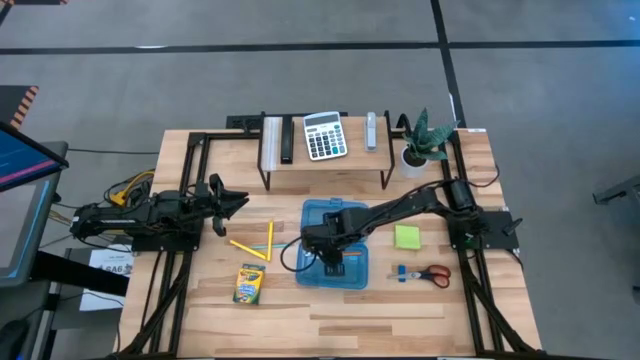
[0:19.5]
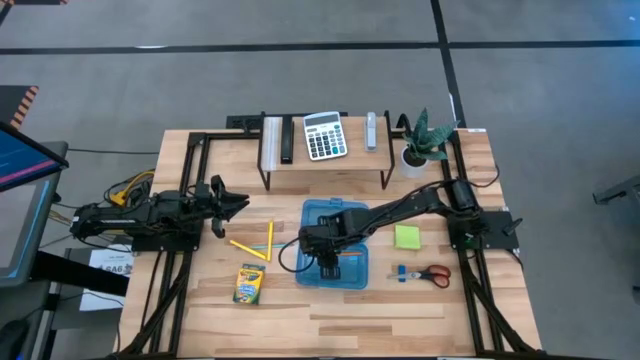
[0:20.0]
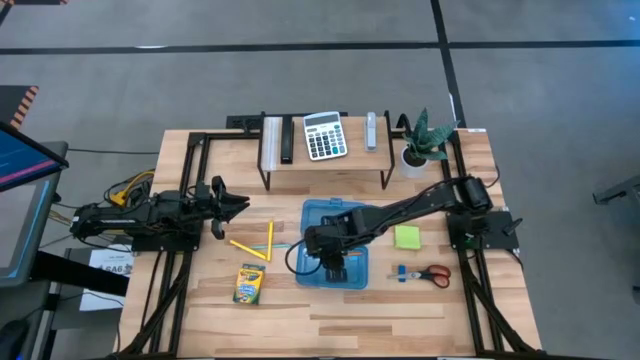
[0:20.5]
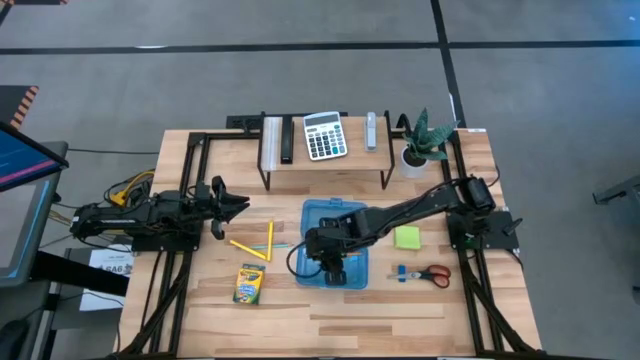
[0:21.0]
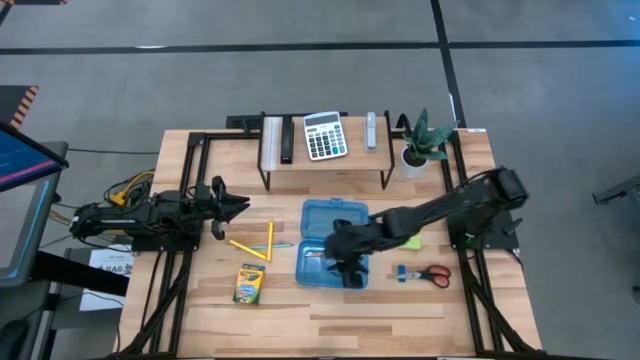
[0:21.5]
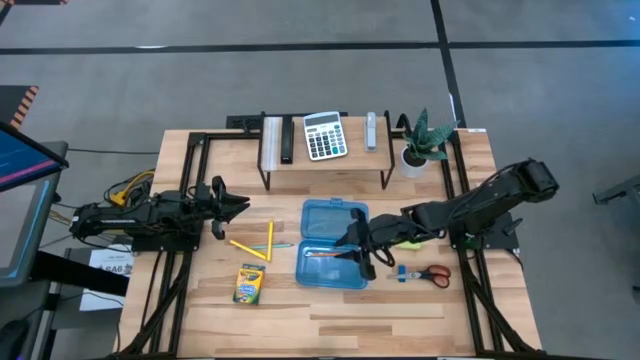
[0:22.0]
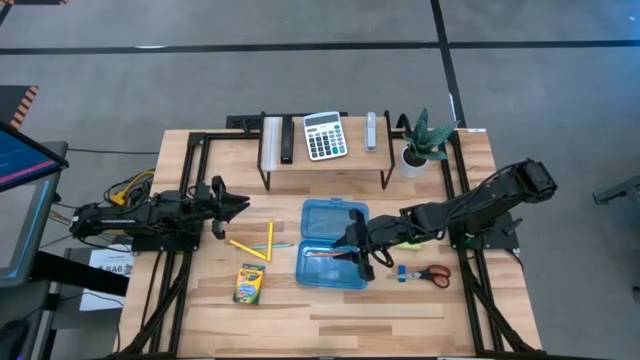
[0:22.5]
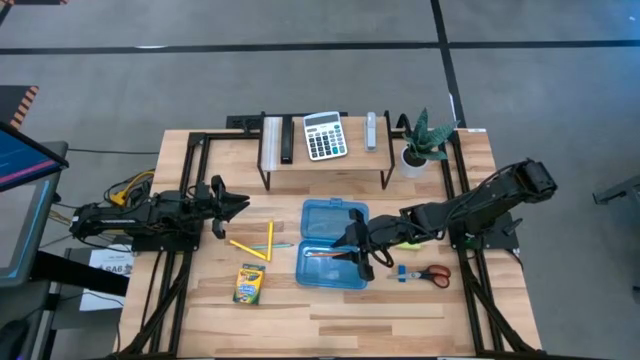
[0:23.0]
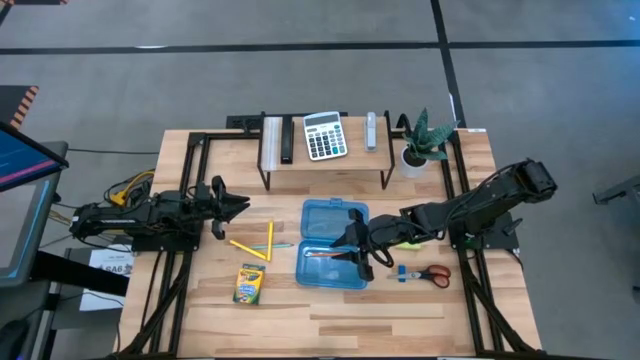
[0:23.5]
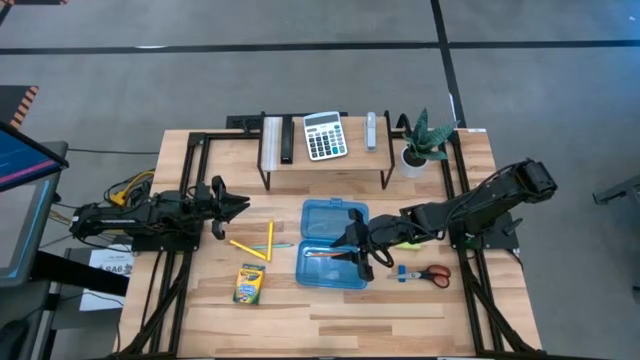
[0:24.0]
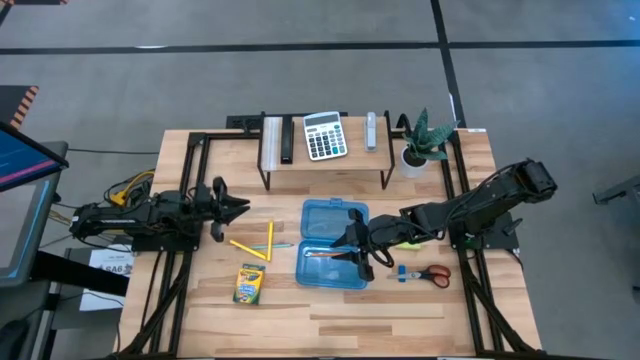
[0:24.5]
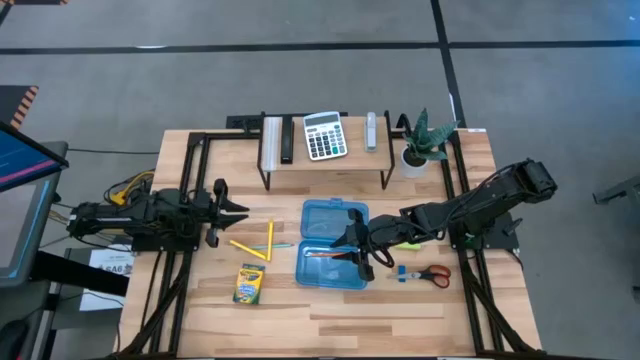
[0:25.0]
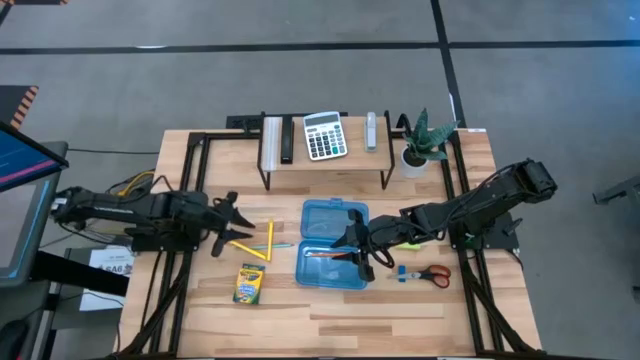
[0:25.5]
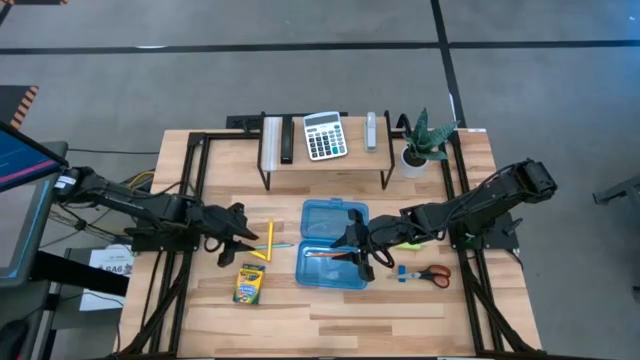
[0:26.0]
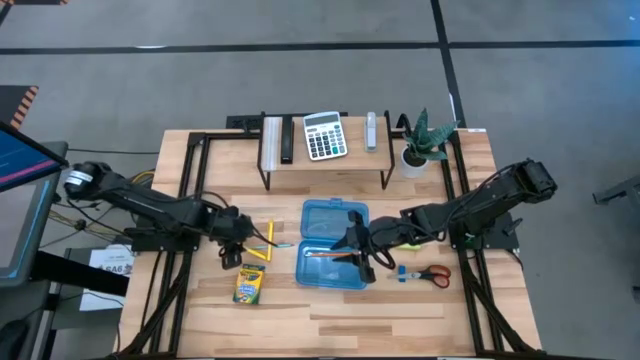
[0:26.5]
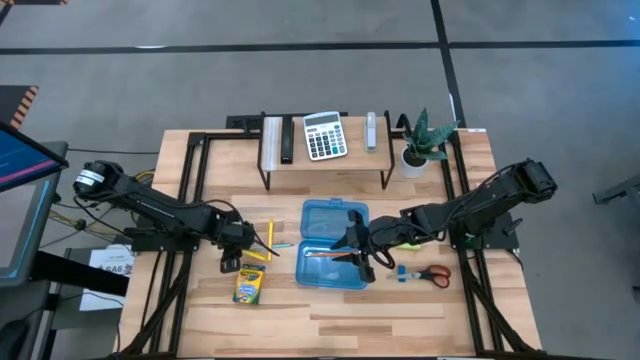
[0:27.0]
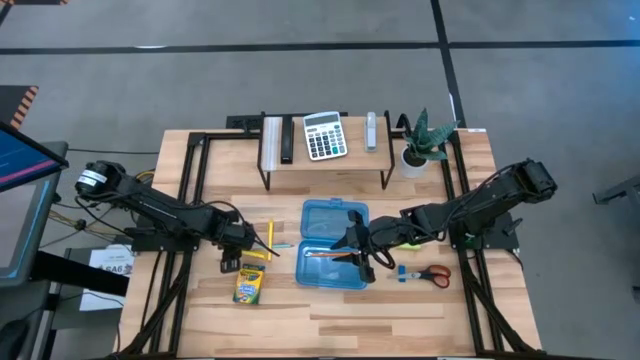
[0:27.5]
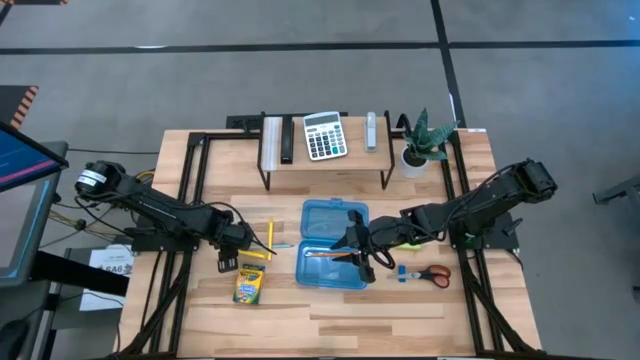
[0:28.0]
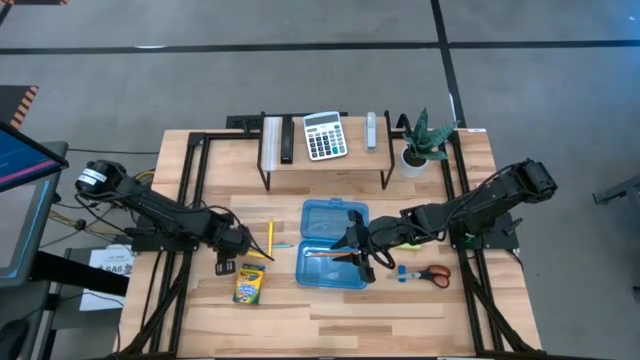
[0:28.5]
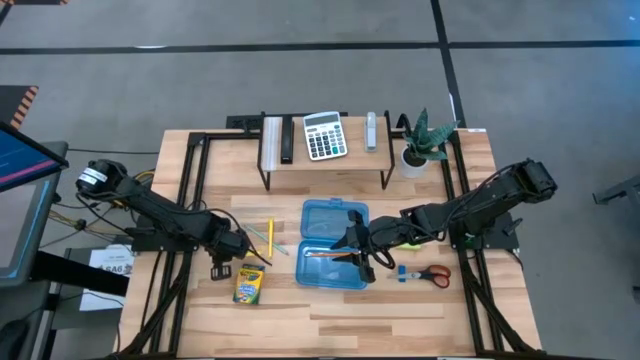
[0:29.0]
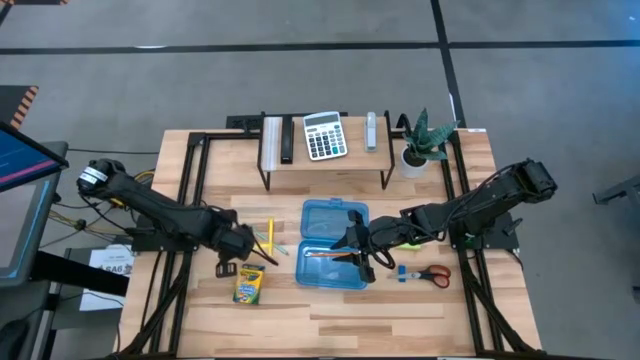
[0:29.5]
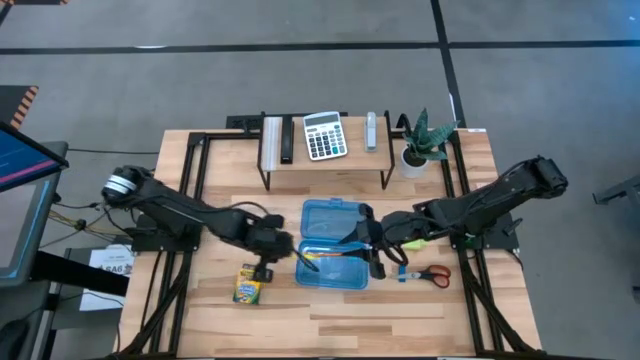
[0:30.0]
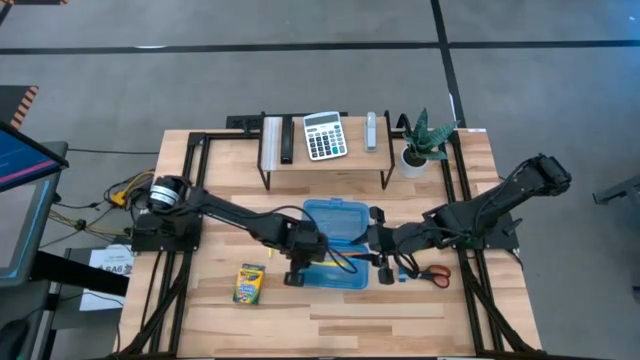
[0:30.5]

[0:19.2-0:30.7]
Task: Pack school essentials
Put the left yellow pen into the supply box

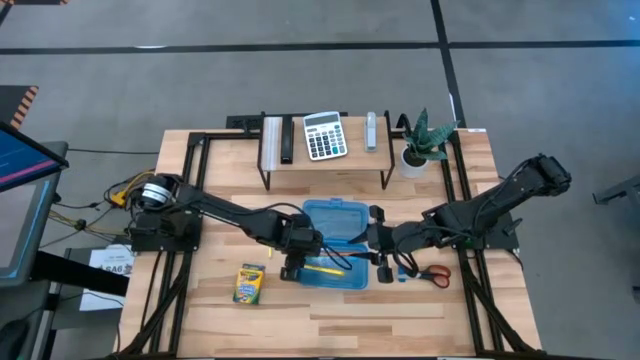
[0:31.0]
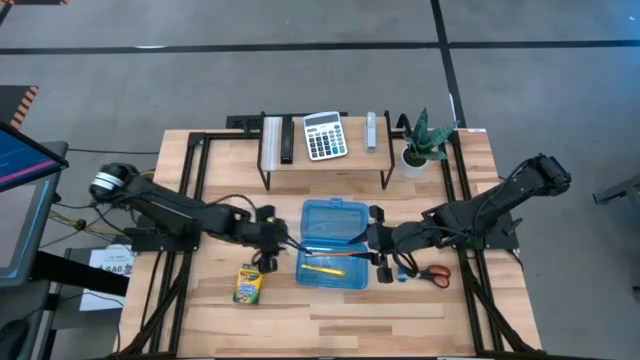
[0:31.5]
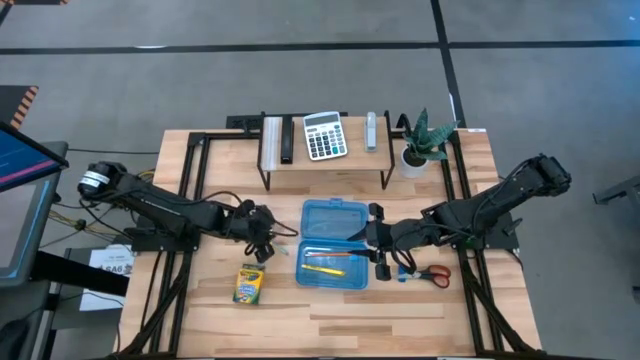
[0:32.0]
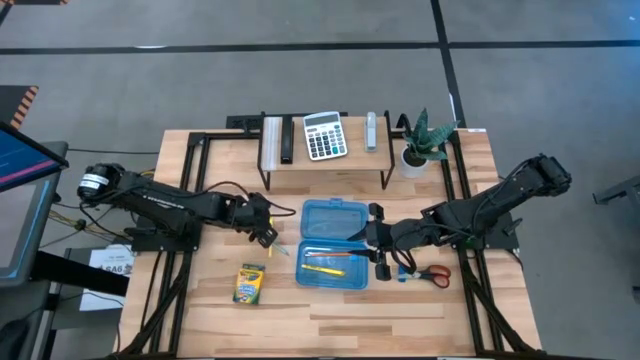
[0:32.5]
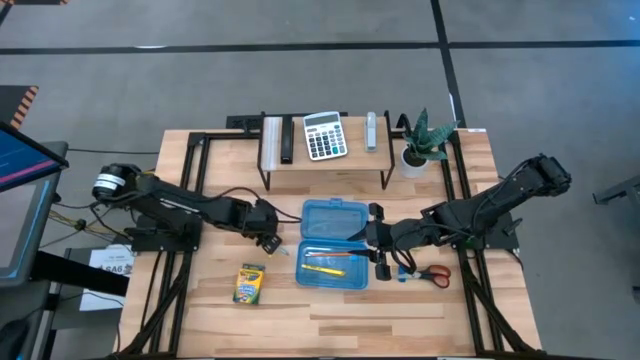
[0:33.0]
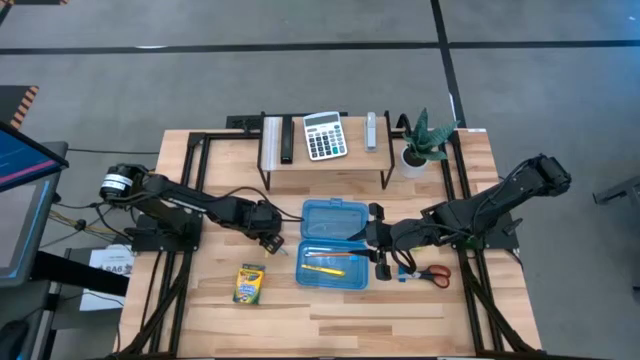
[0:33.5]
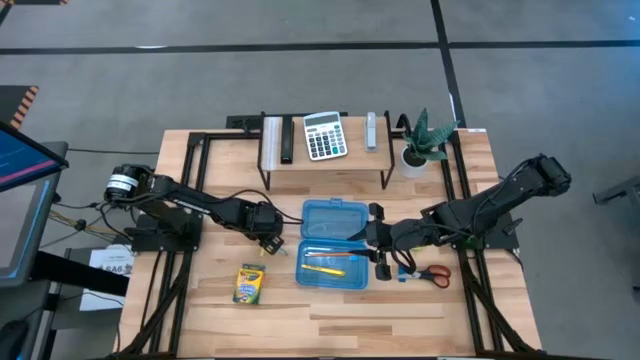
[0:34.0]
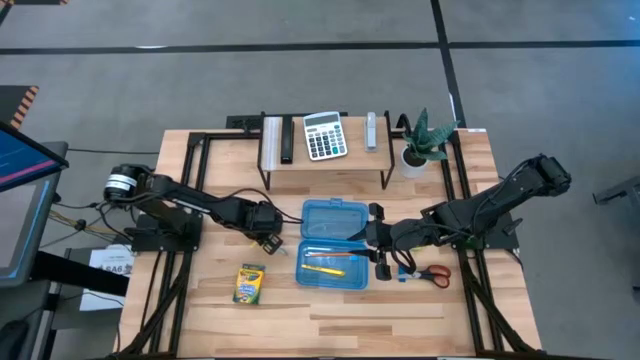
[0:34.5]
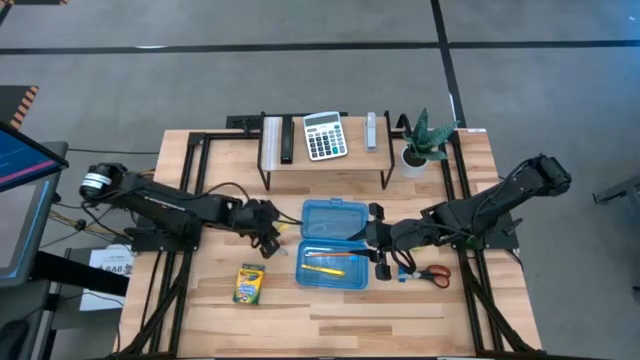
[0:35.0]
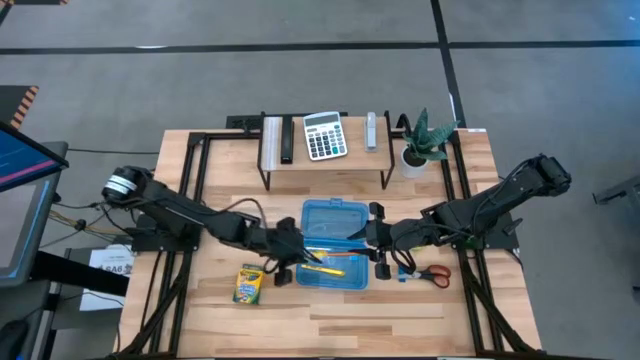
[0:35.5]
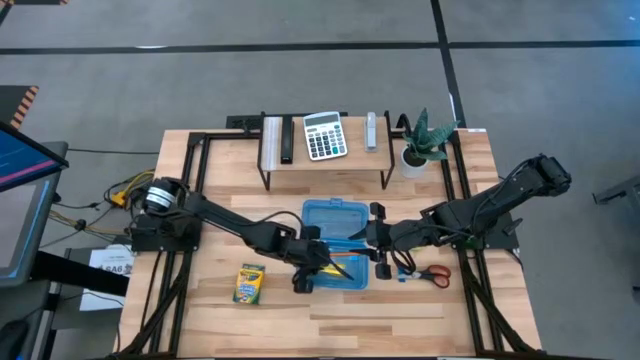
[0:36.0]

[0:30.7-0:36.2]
Put the yellow pen into the supply box

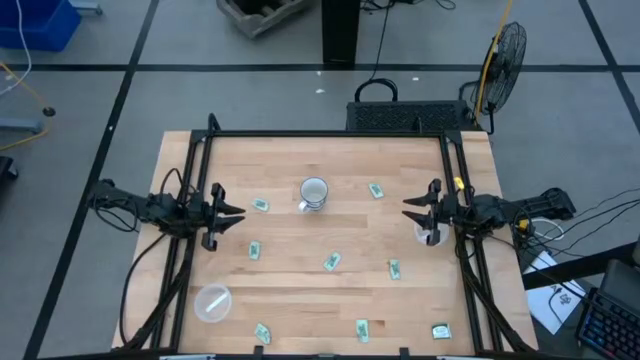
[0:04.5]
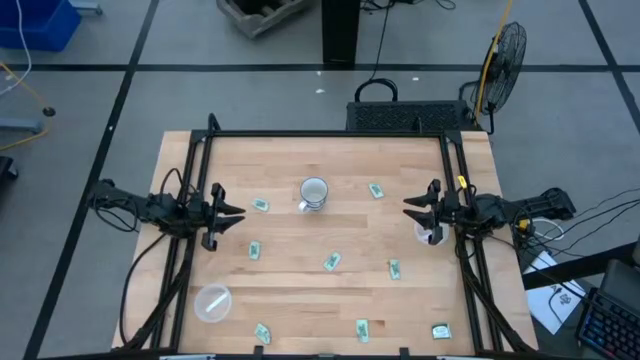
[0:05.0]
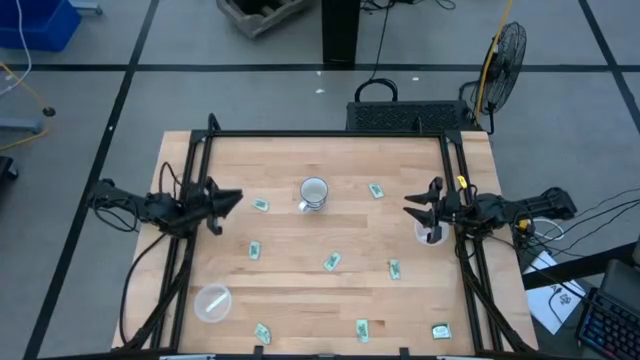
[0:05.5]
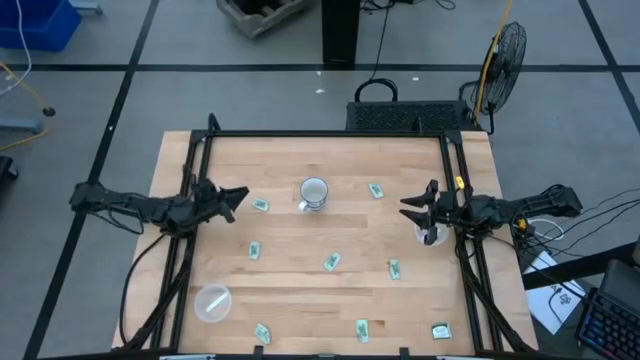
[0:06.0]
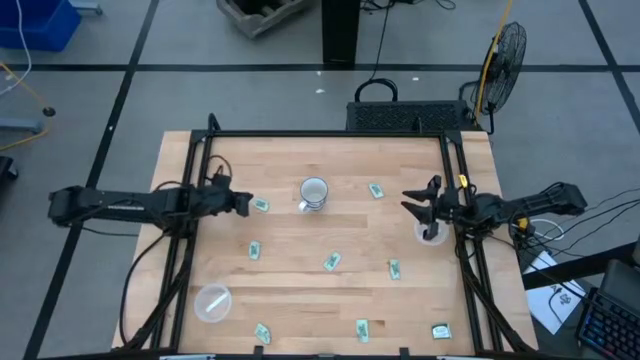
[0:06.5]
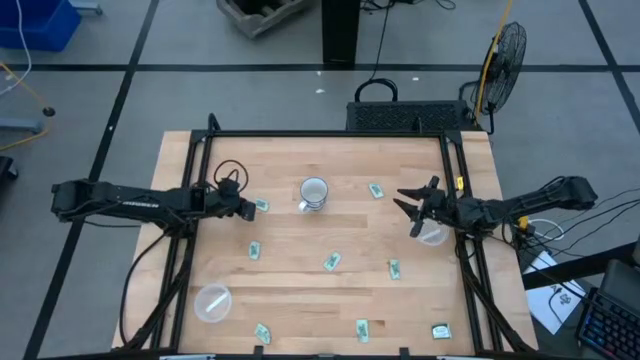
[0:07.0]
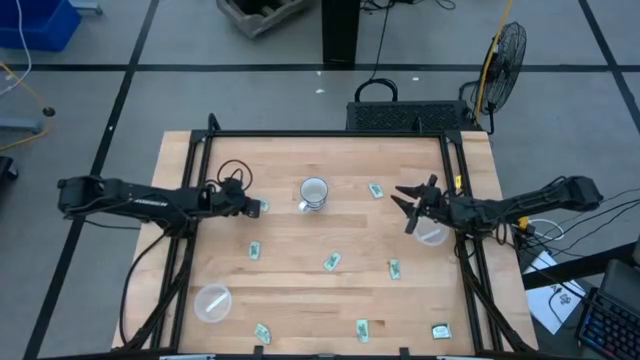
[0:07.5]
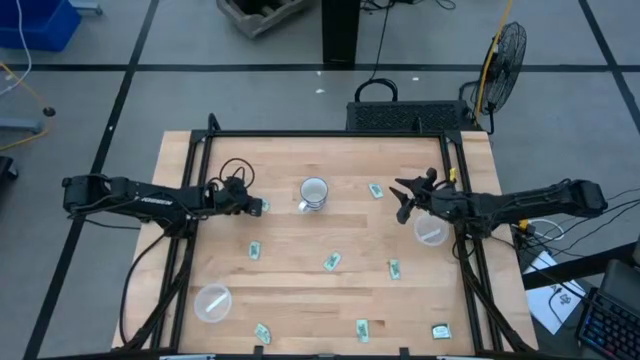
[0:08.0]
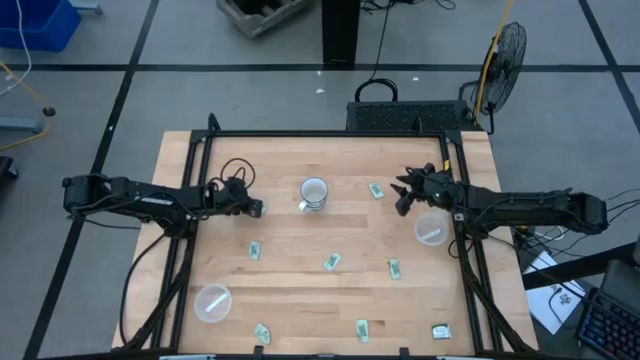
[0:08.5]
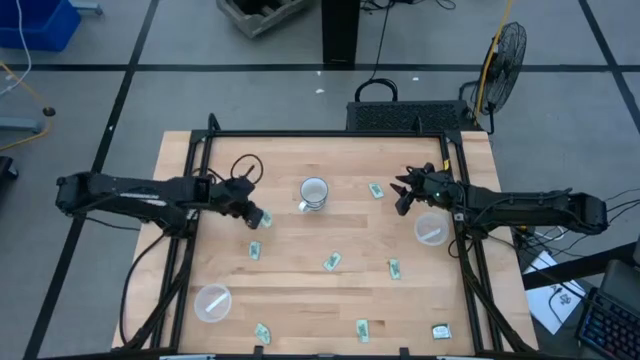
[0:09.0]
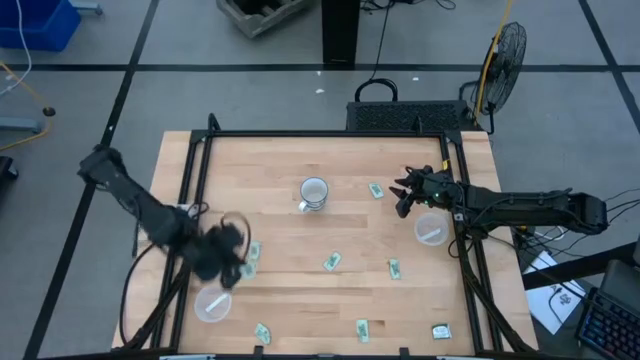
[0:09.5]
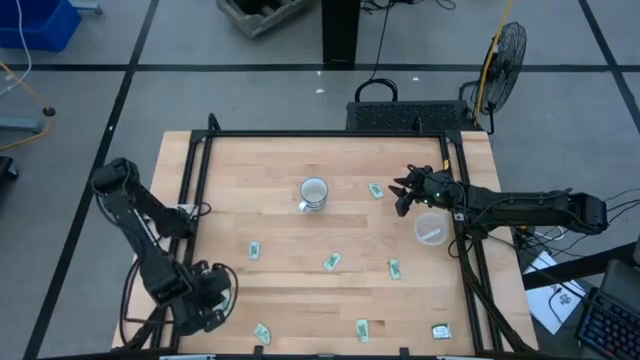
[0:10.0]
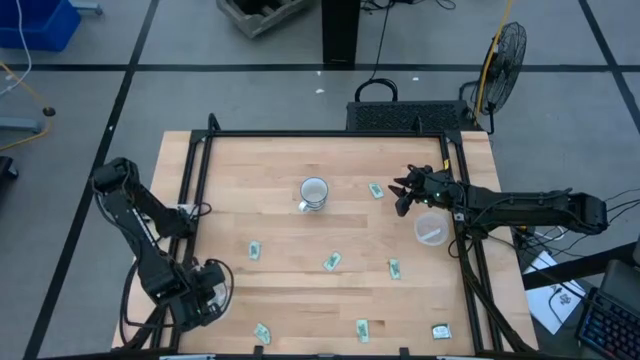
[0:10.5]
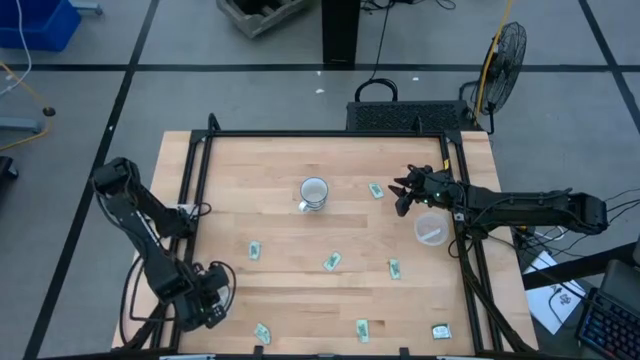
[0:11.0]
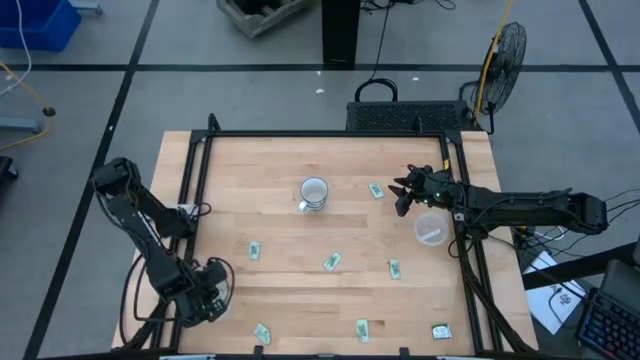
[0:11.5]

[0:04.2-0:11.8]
Task: Pick and place Stevia / Truvia into bins
Put the green stevia packet into the left transparent container
